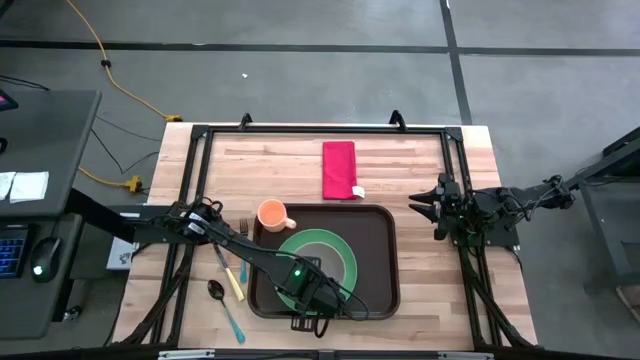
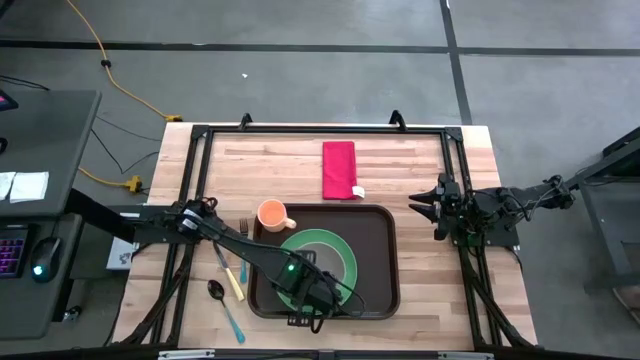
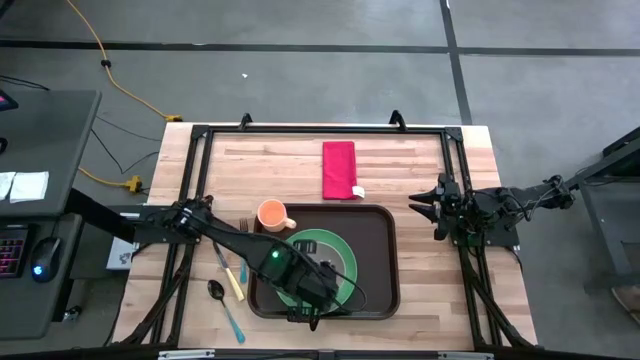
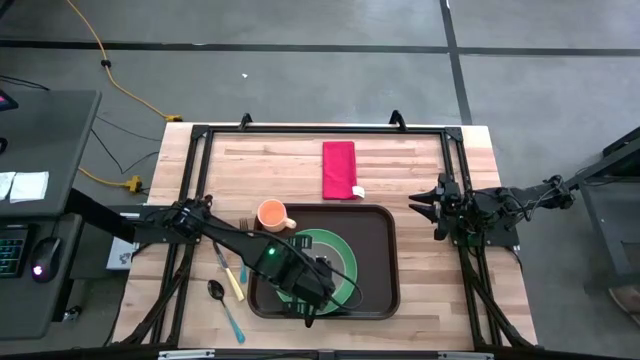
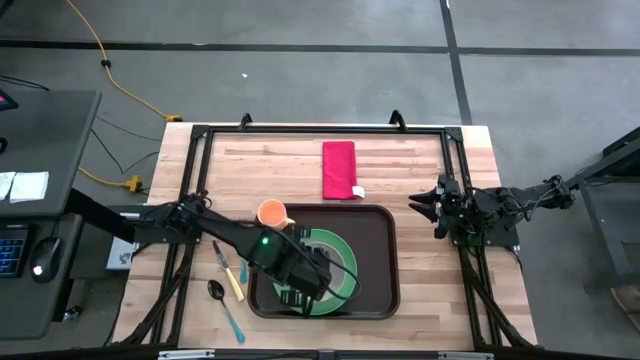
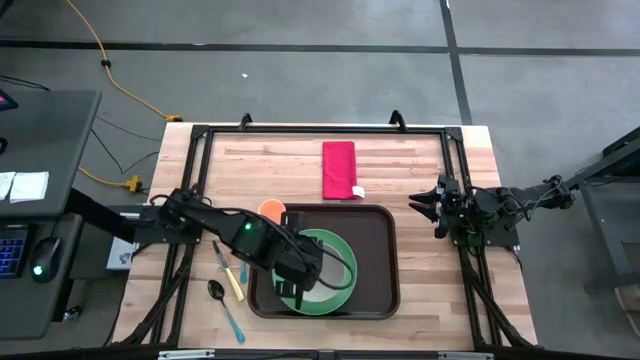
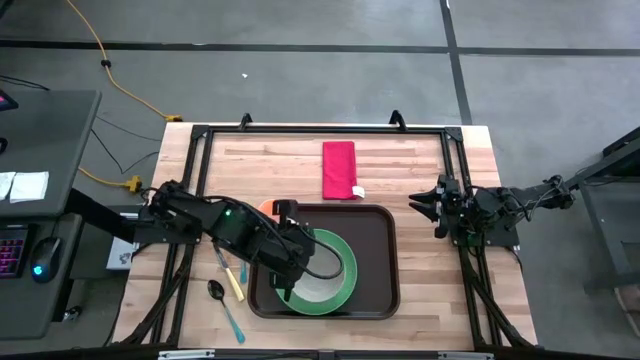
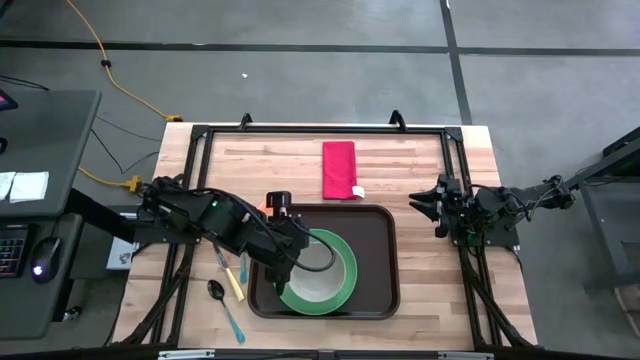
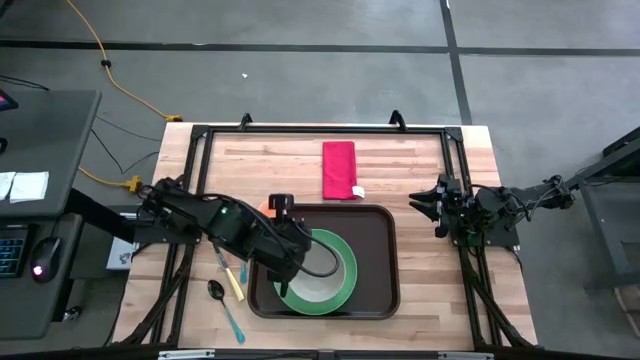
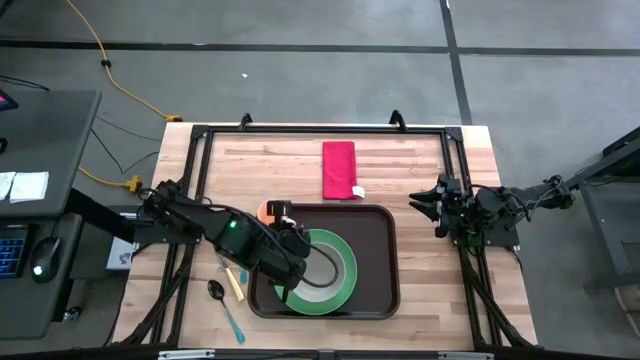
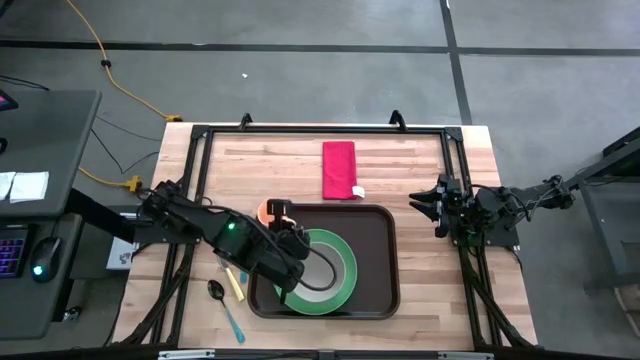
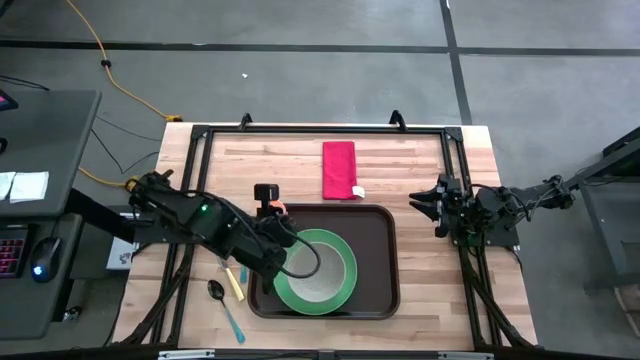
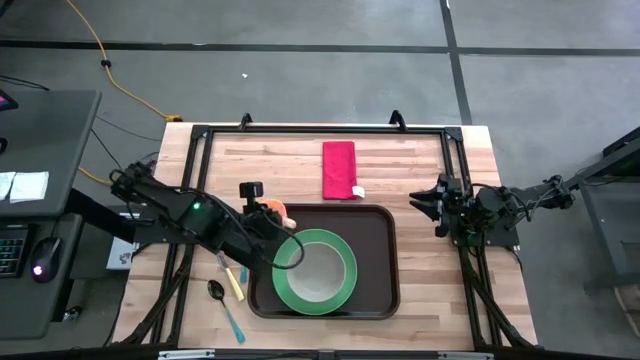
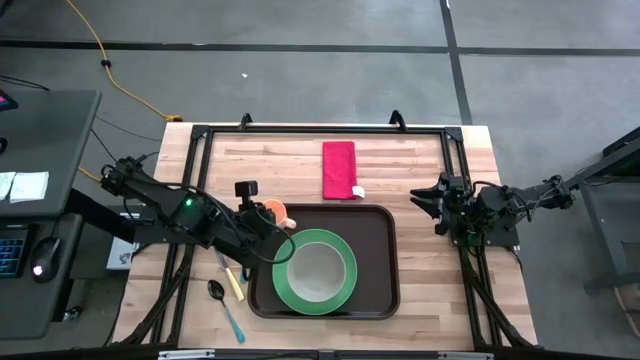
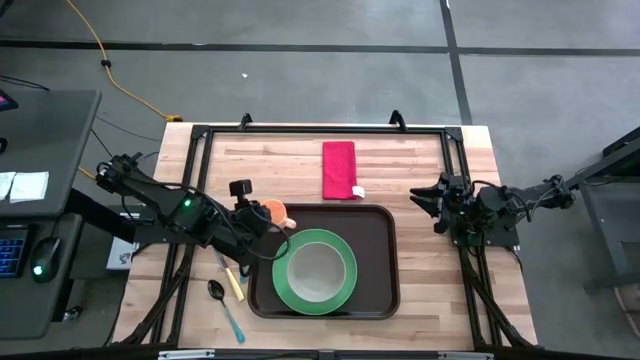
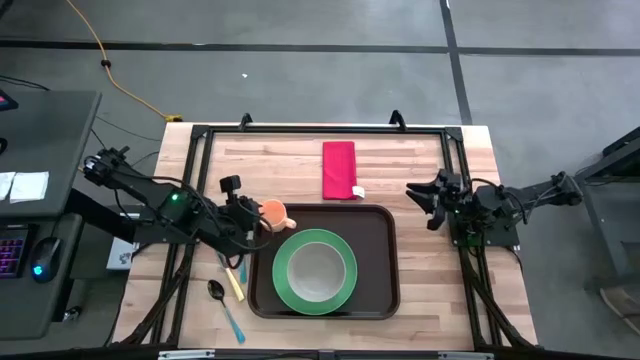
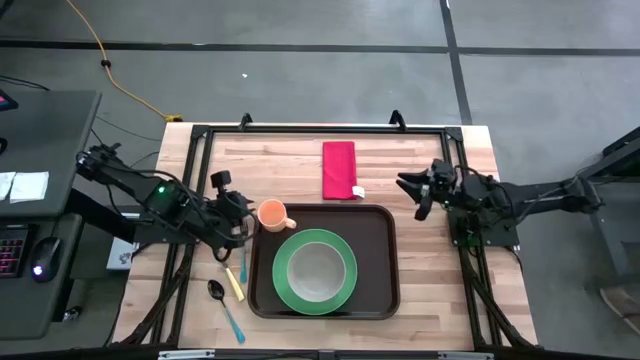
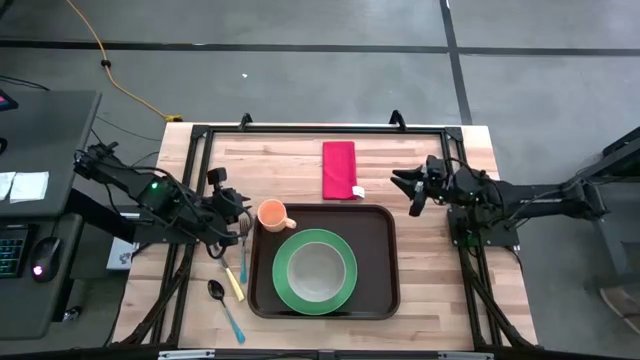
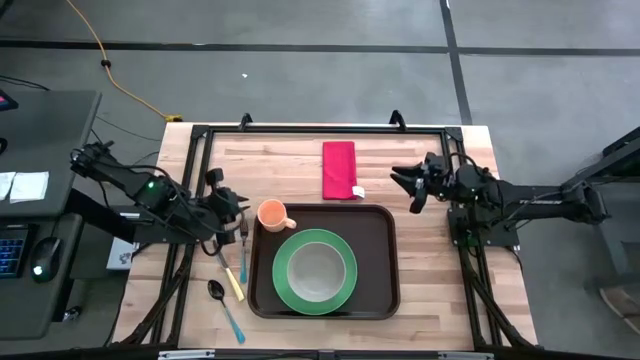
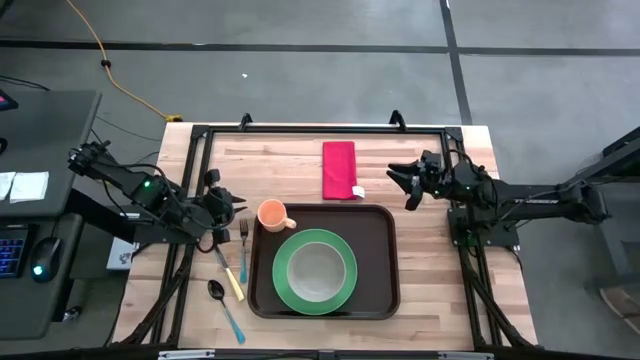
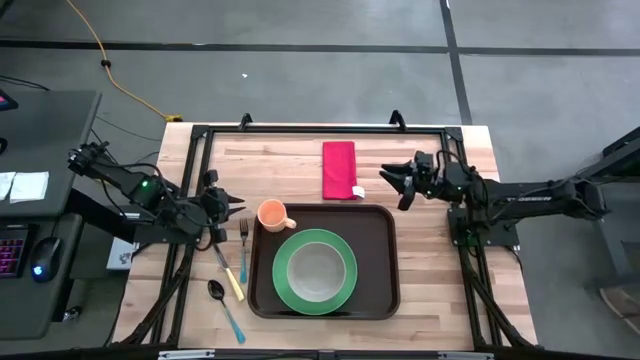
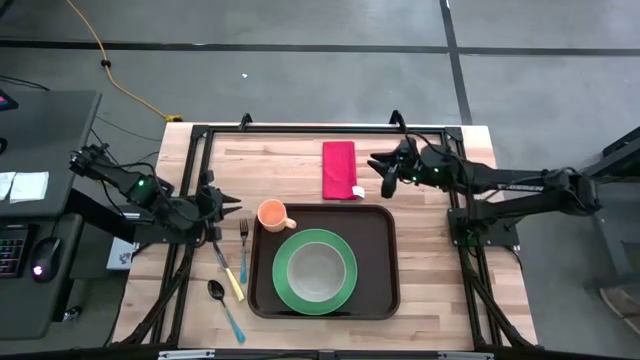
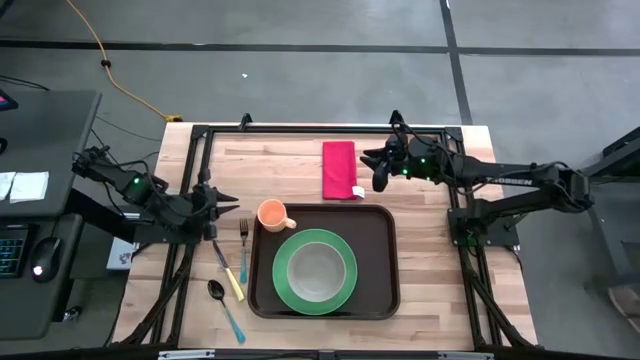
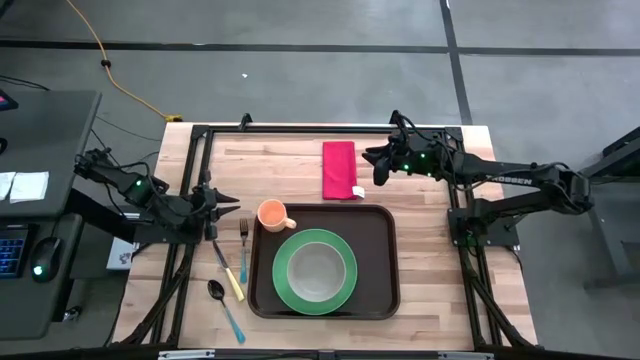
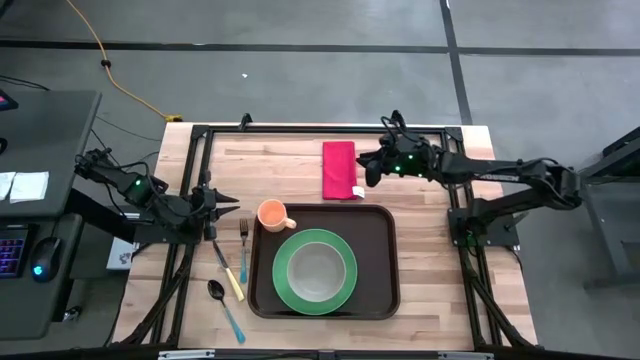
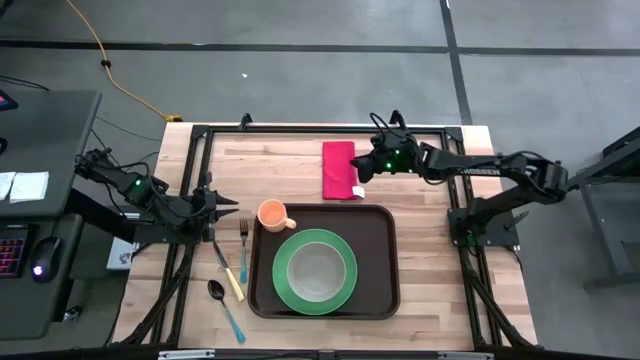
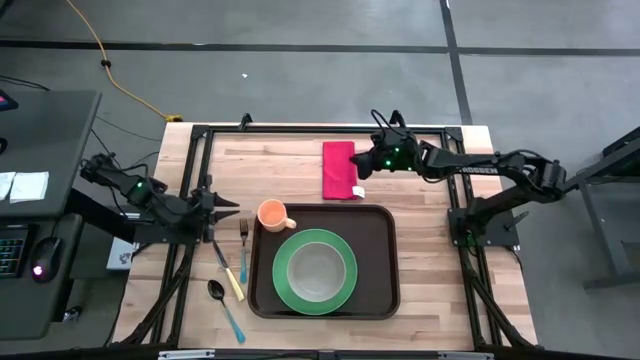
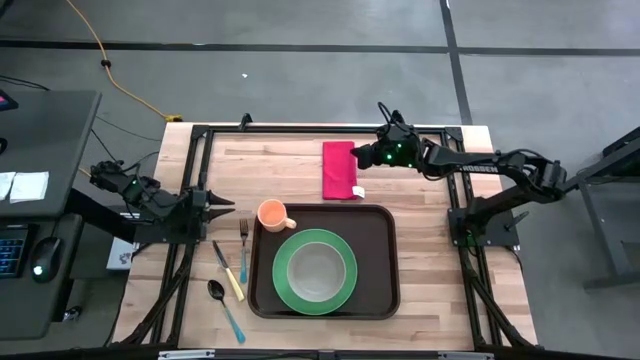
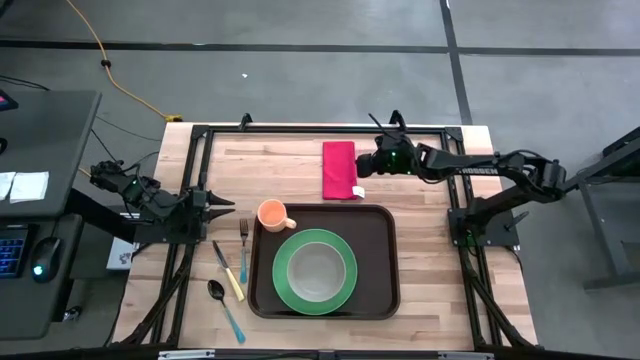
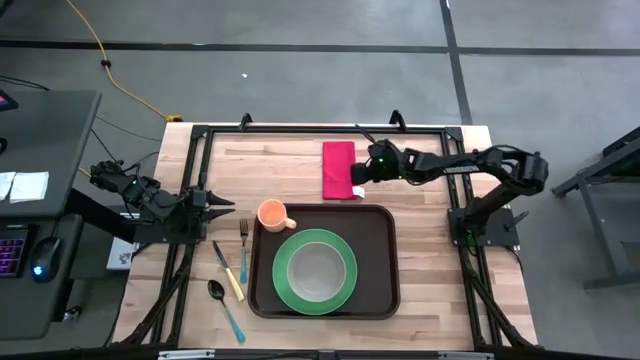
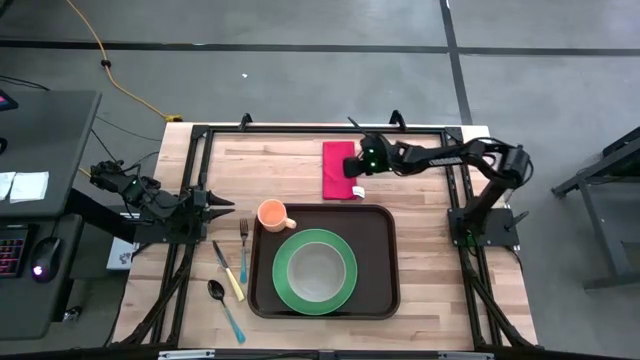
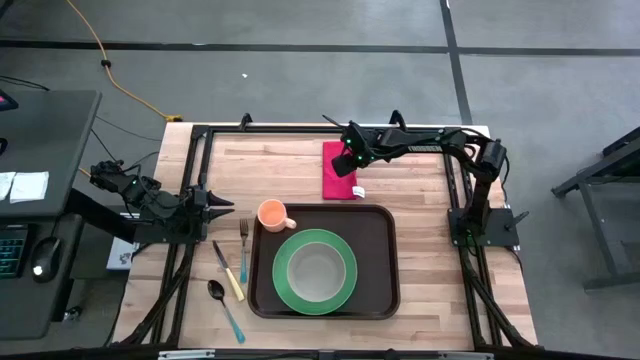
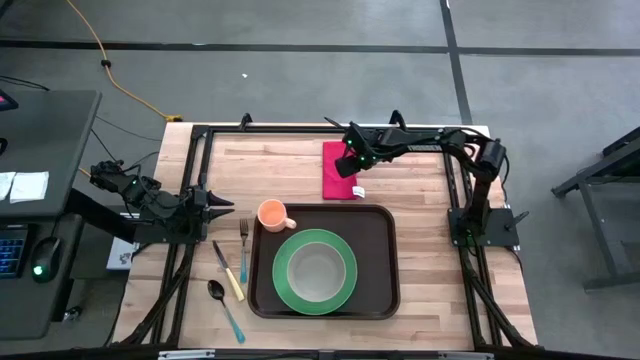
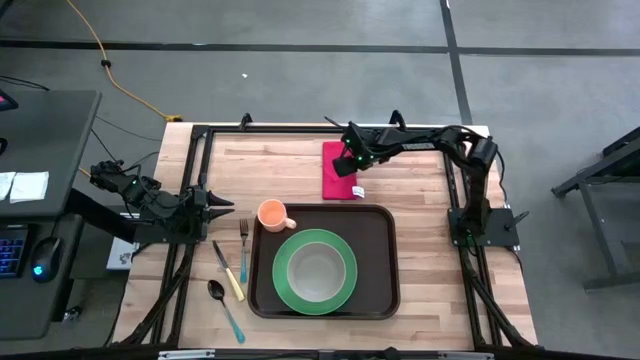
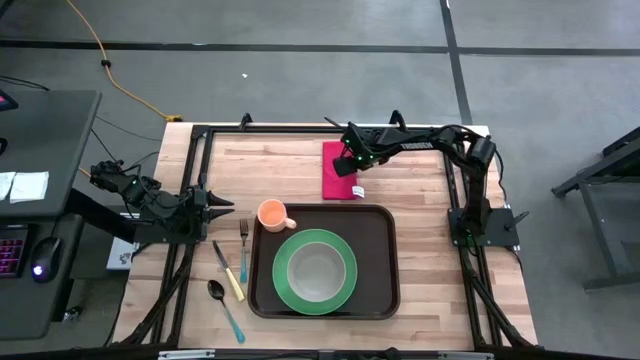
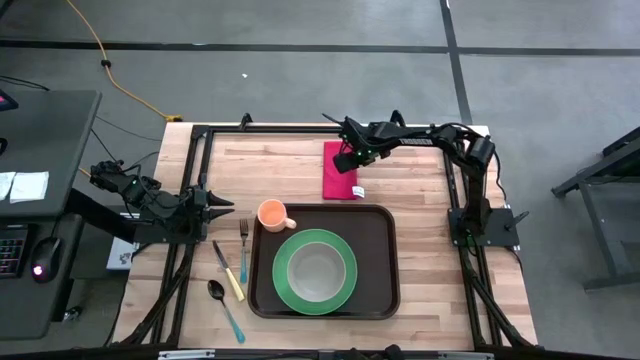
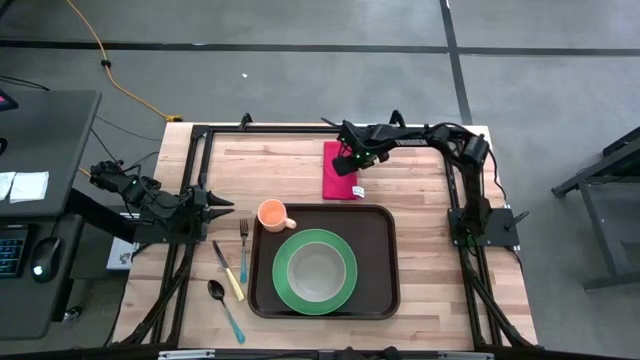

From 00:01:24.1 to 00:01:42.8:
Task: Set up tray
Put the red table napkin on the black serving tray to the right of the green plate

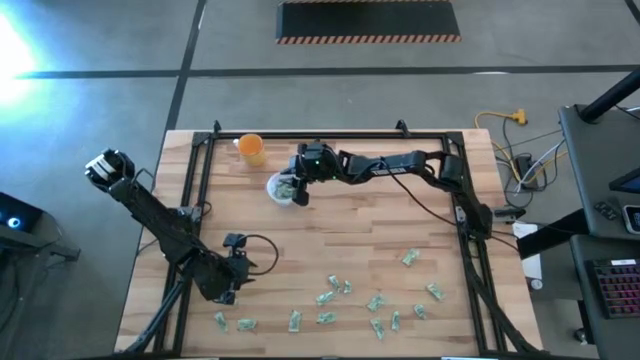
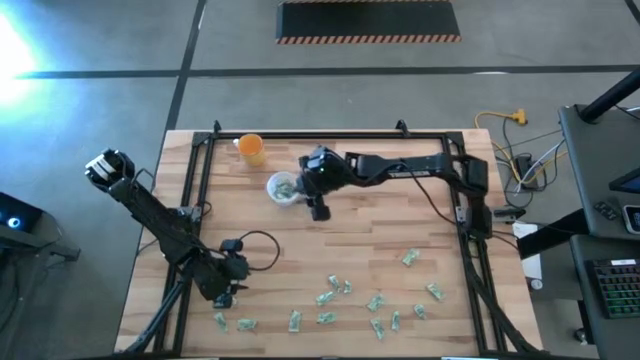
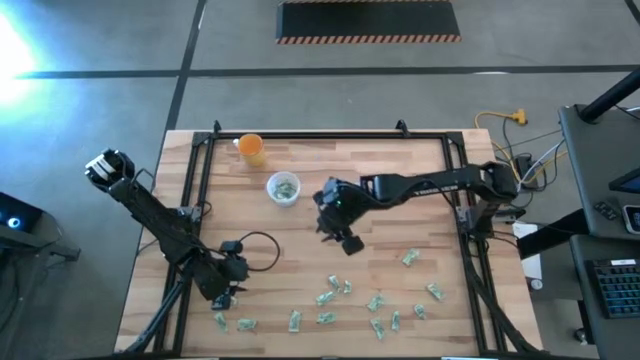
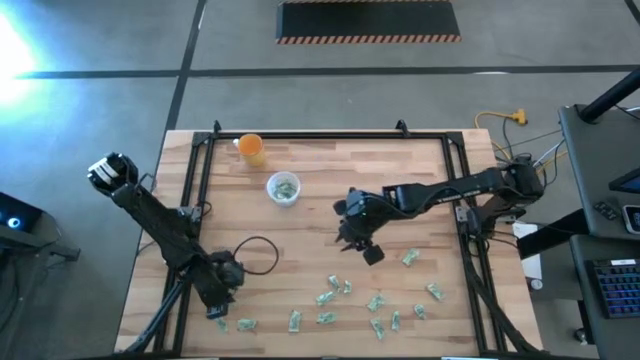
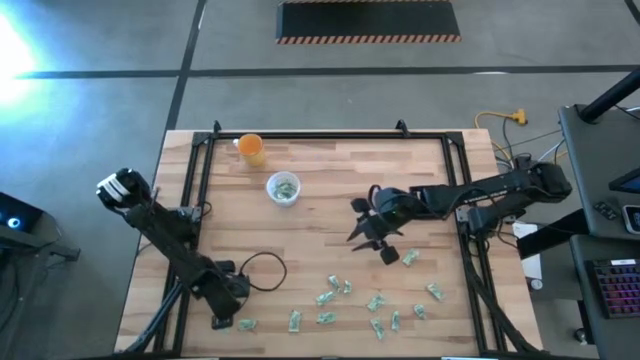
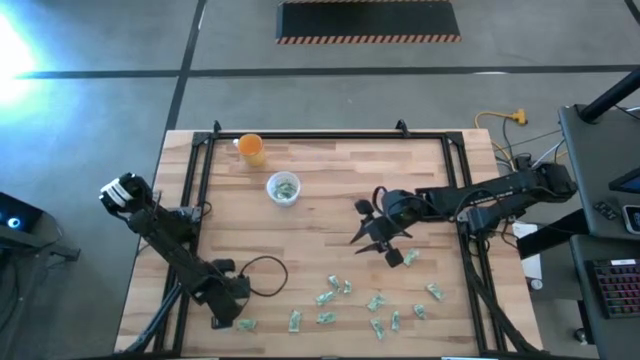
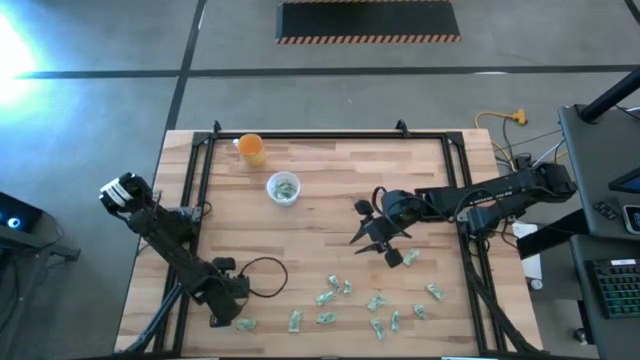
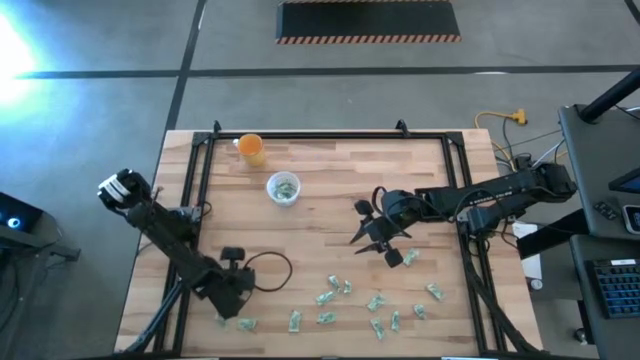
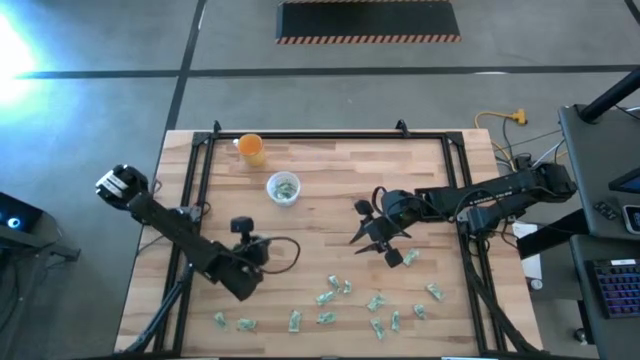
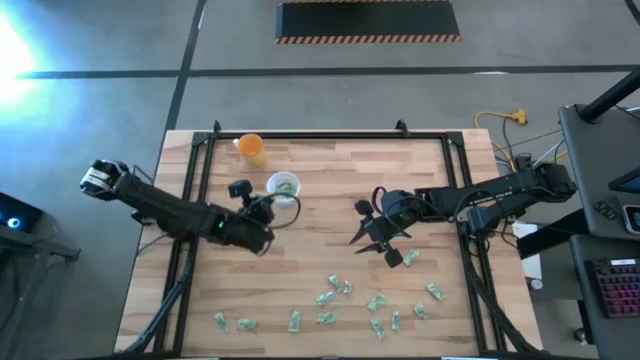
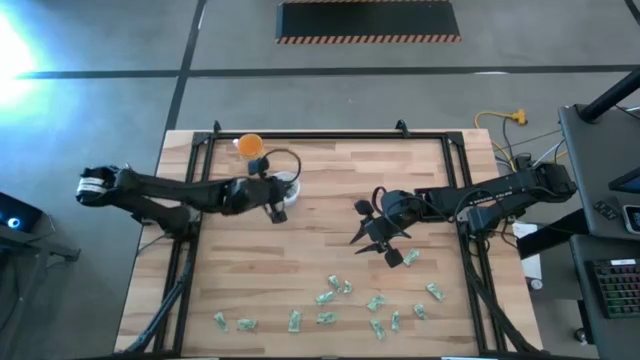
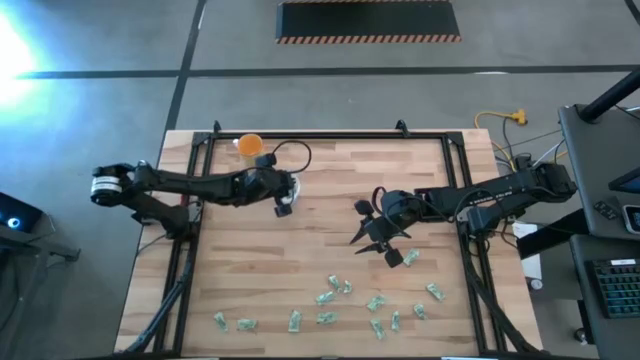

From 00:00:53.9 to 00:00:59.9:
Task: Pick and place Stevia / Truvia into bins
Put the stevia packet into the transparent container
